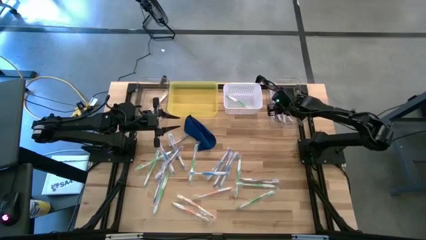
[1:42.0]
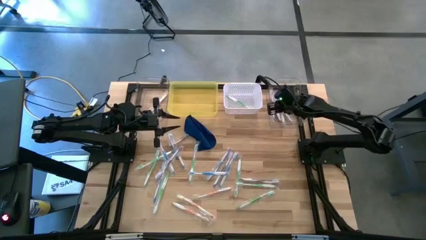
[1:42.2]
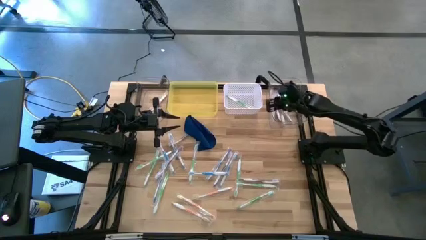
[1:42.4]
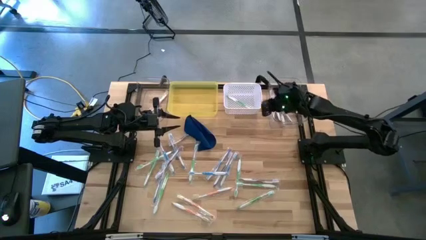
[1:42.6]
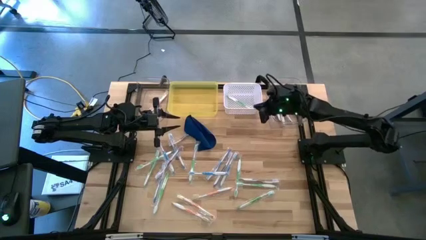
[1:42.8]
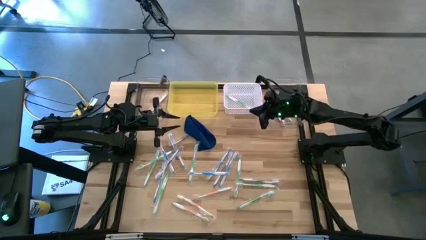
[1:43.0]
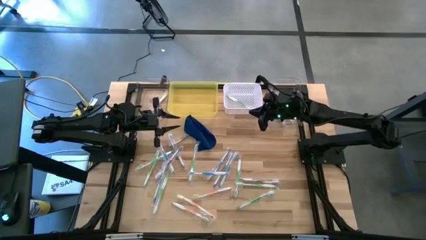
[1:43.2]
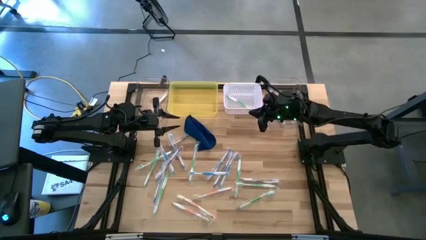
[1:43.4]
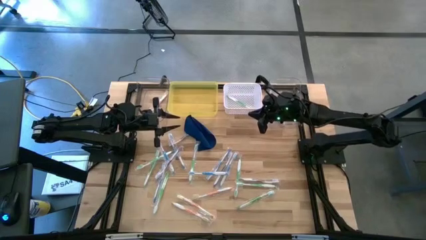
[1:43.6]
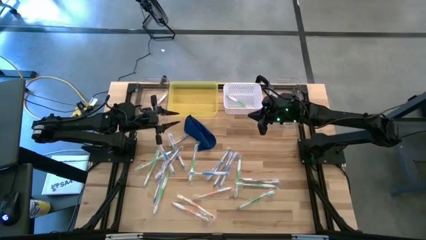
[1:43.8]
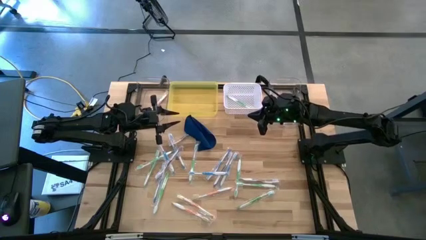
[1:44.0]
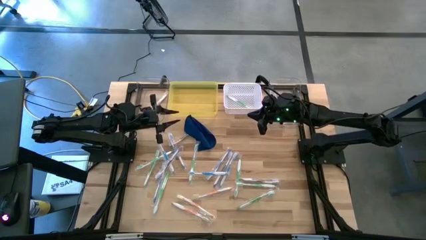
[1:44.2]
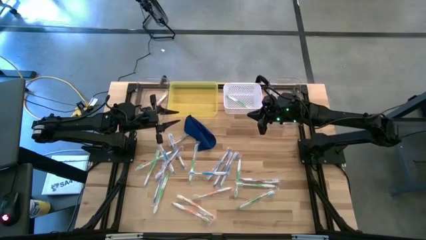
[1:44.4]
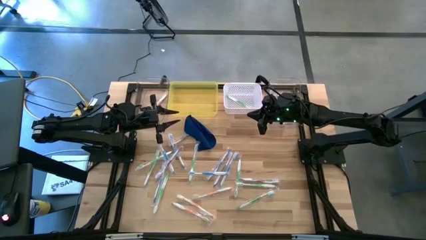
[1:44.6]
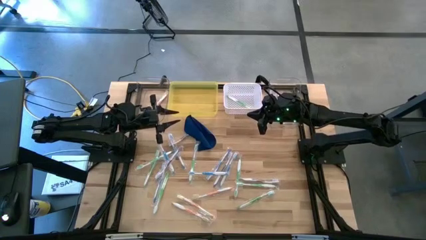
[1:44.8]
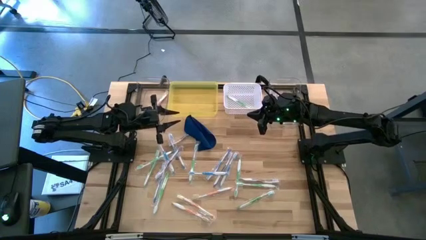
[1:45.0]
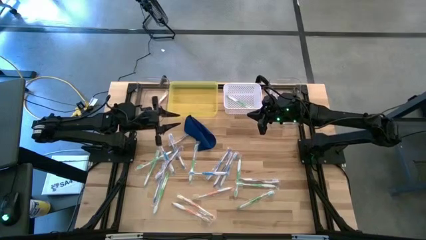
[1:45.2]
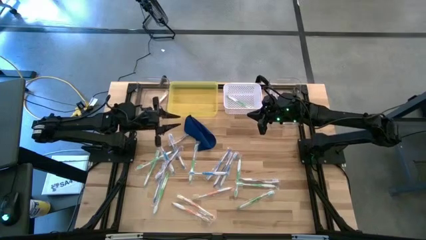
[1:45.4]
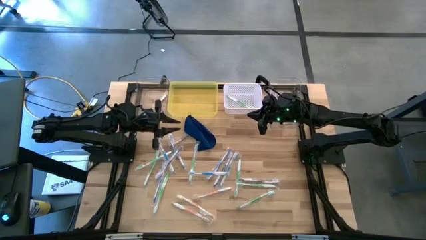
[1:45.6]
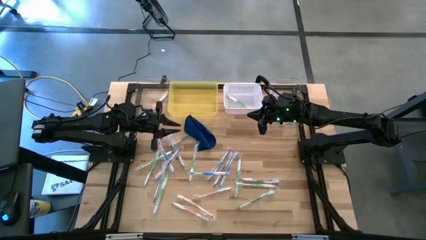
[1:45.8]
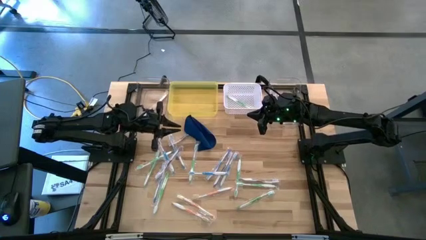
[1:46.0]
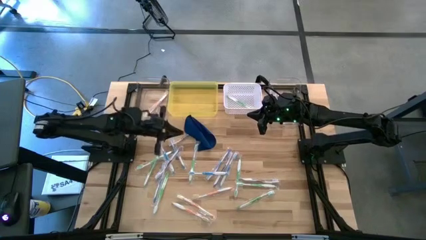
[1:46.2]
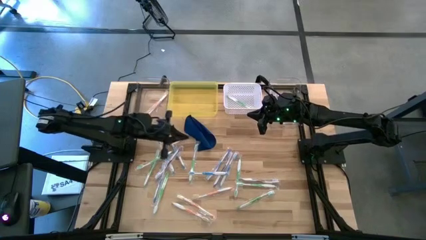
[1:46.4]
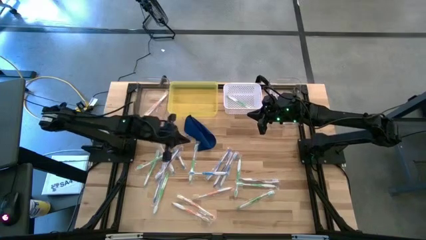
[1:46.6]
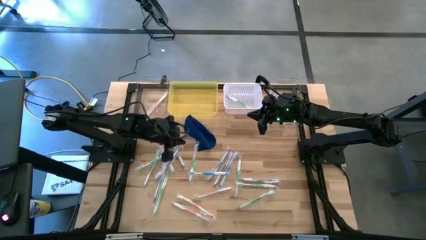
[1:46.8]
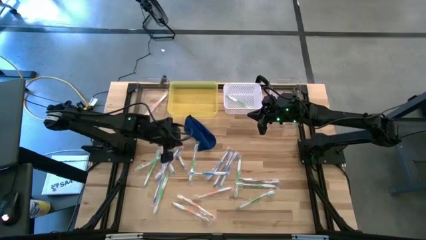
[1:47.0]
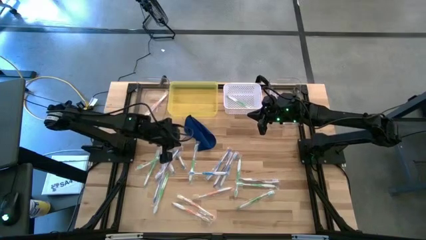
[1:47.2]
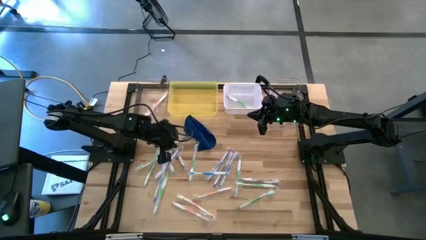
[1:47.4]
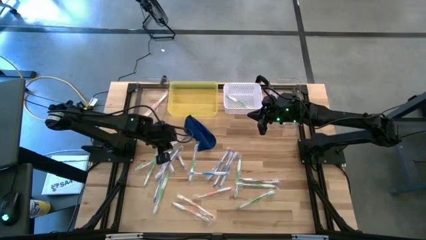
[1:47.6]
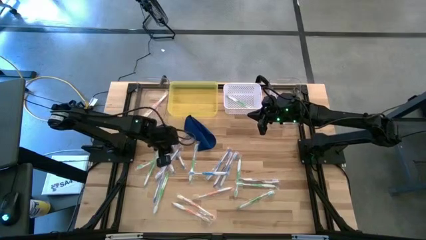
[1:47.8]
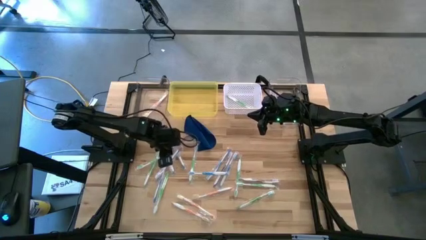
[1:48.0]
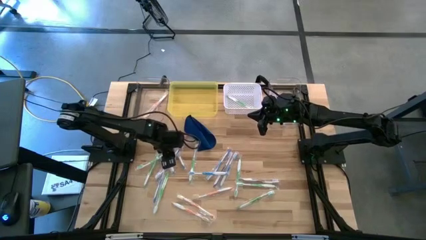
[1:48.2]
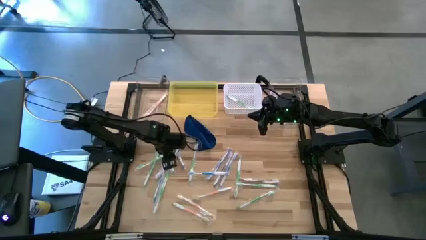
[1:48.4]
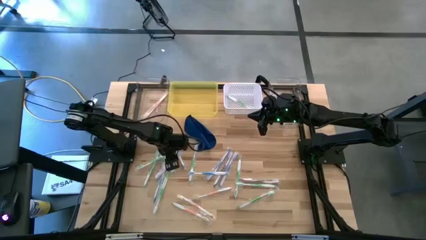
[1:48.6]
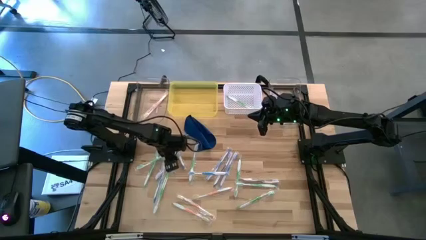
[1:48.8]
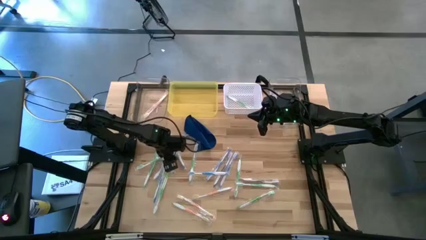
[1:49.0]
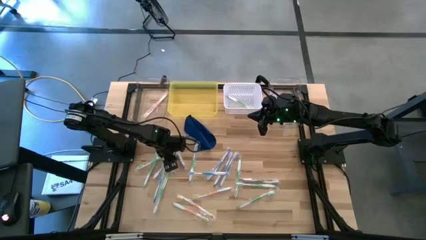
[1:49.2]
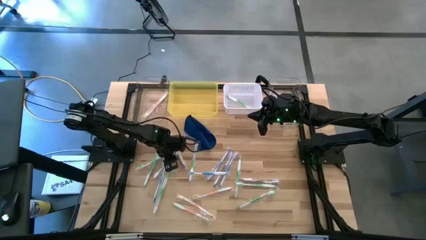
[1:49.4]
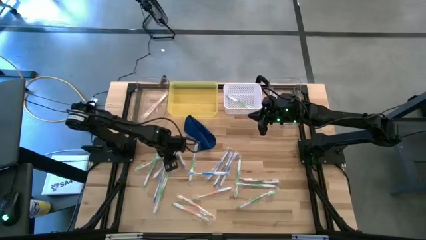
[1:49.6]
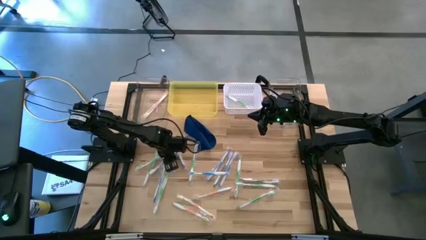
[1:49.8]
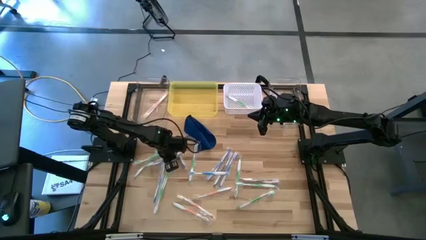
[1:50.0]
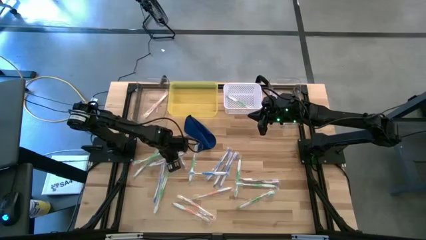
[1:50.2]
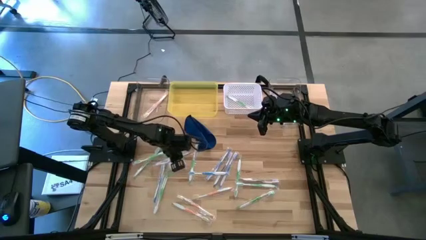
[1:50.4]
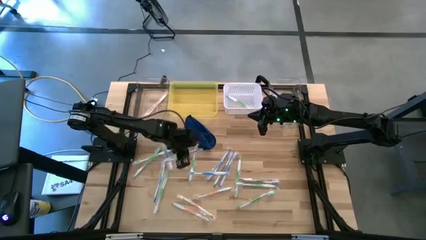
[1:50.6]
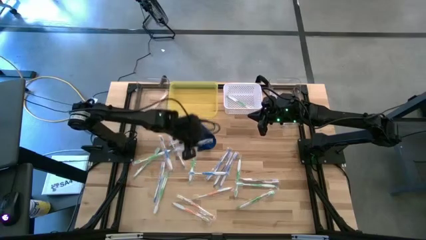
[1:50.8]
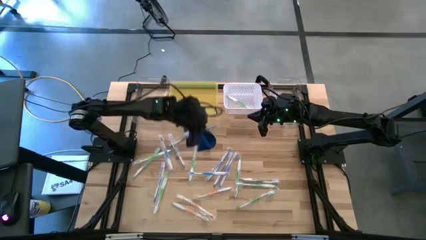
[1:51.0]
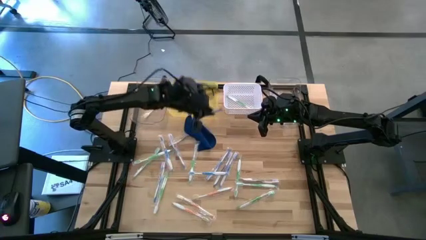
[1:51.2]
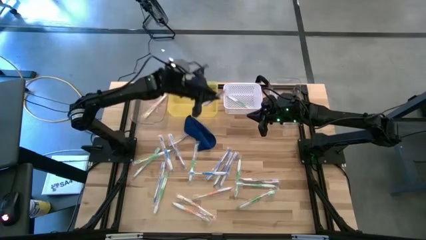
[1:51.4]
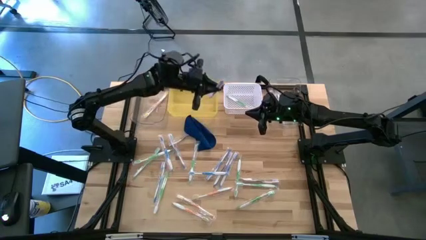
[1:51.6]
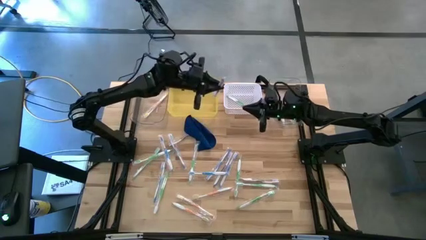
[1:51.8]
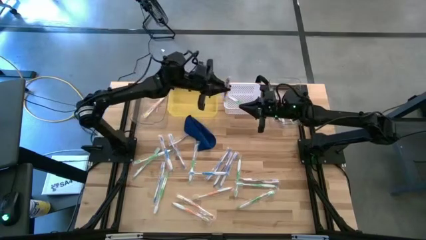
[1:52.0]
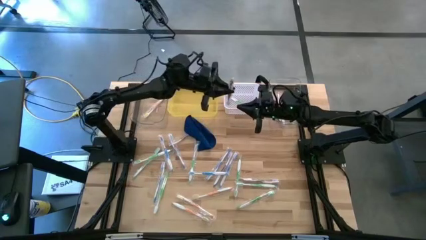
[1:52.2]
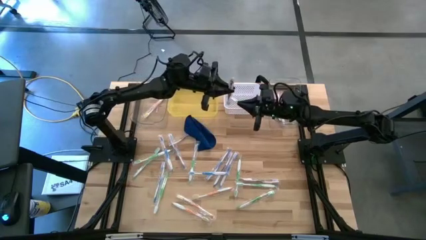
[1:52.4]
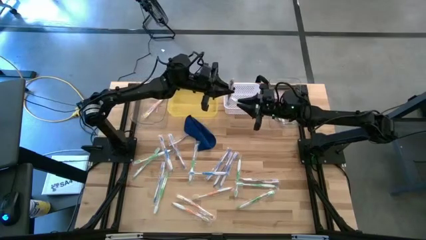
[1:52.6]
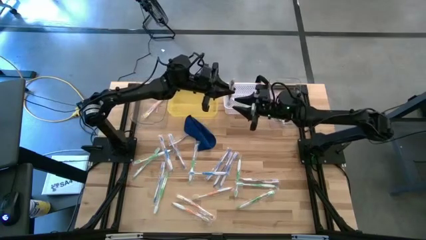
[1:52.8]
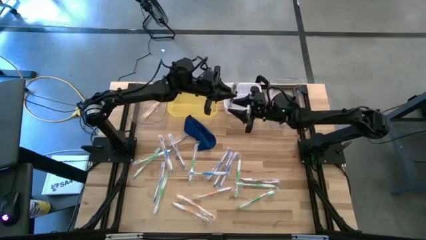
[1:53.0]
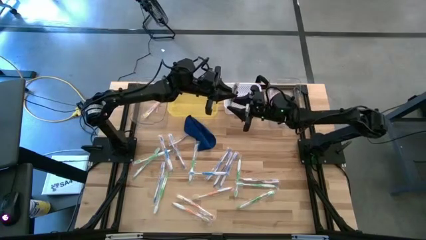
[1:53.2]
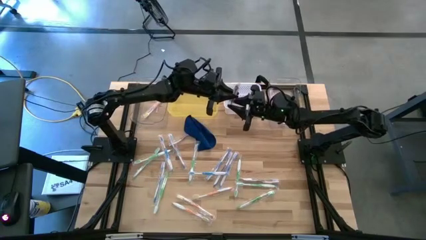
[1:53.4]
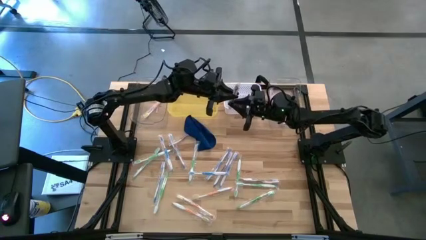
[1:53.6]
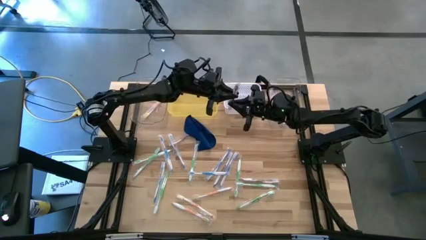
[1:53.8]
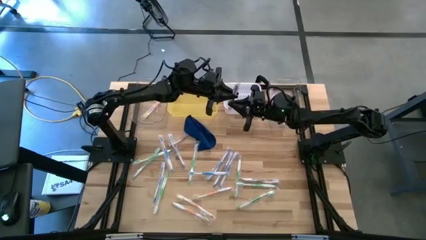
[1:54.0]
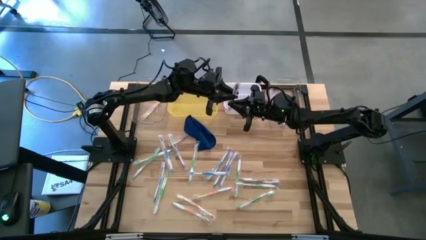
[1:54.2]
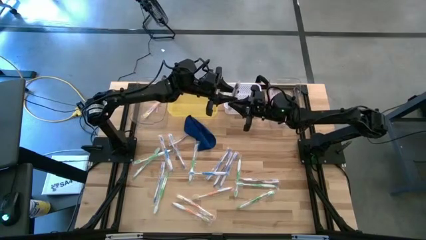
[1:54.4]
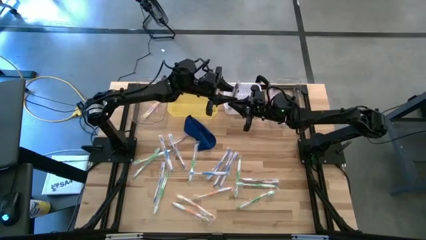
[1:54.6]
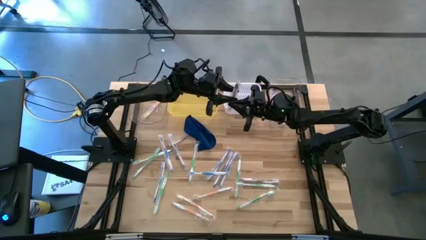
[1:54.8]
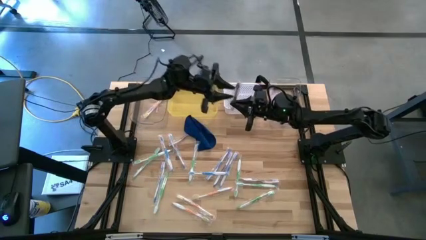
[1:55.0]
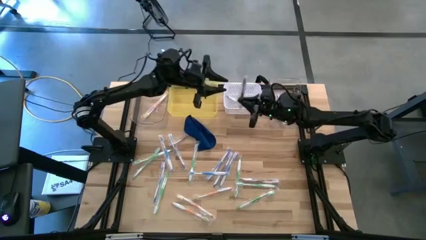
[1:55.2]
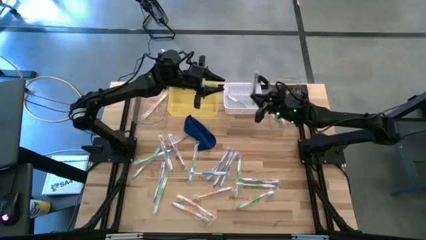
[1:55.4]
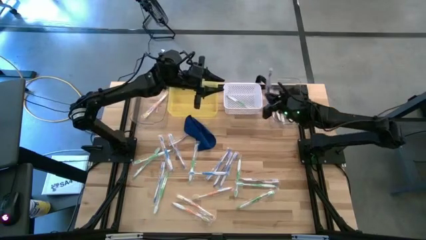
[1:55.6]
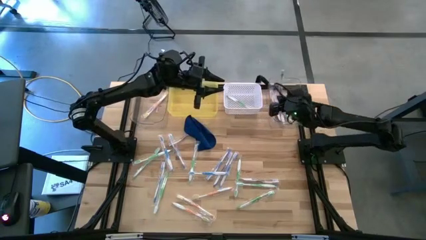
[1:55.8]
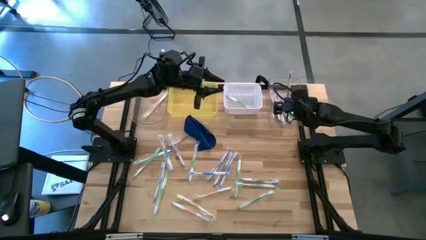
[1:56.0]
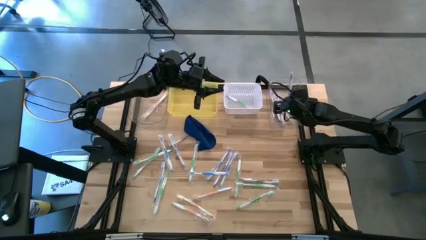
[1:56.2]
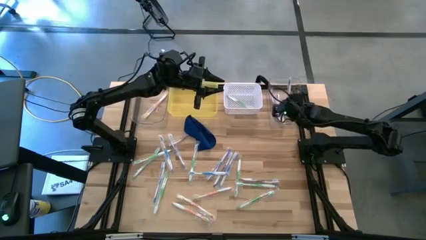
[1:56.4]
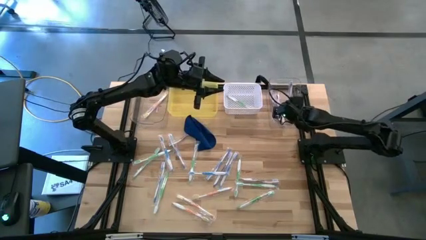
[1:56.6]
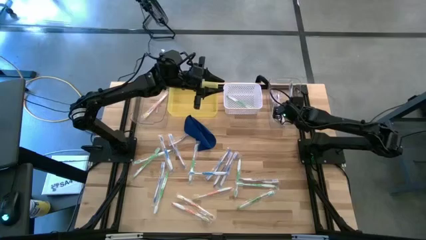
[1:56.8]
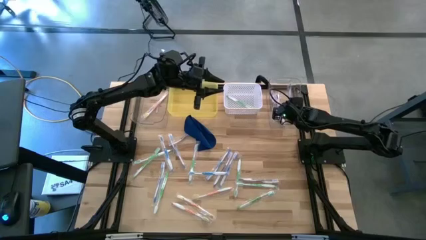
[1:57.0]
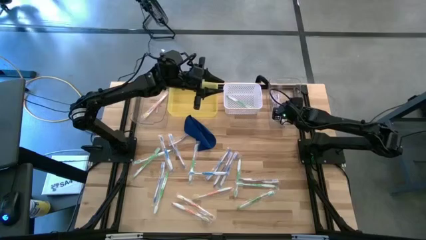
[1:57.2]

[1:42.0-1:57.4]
Task: Pick & Place Toothbrushes
Put the violet toothbrush into the right transparent bin

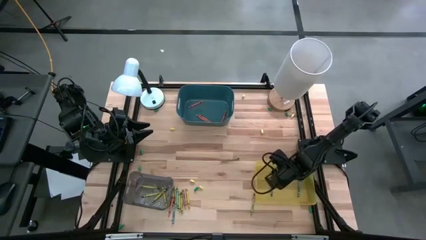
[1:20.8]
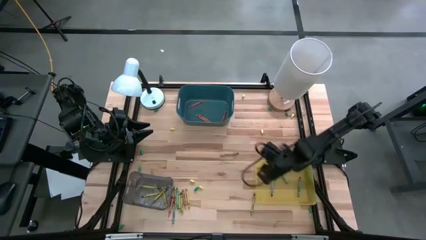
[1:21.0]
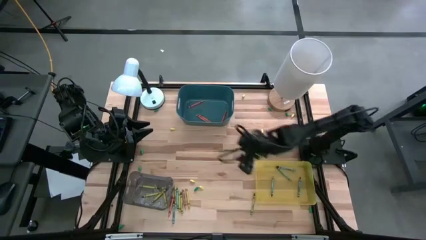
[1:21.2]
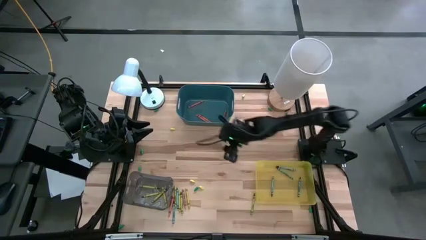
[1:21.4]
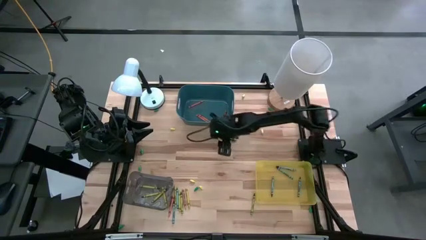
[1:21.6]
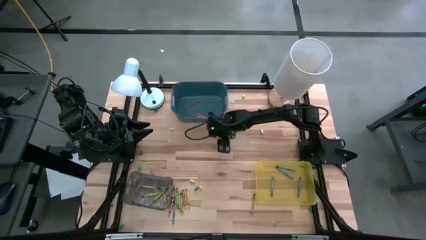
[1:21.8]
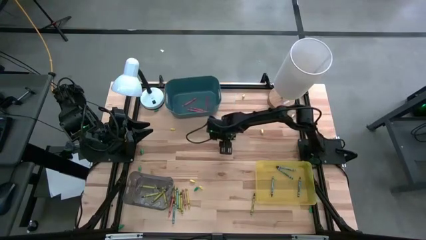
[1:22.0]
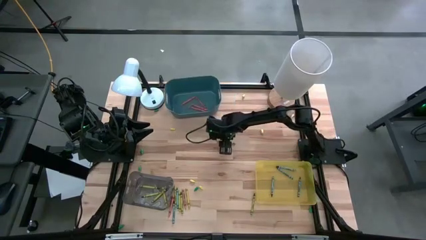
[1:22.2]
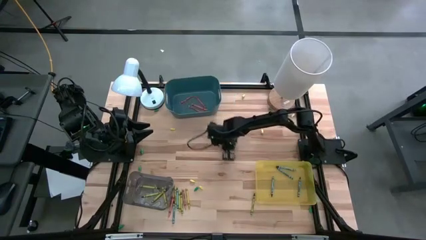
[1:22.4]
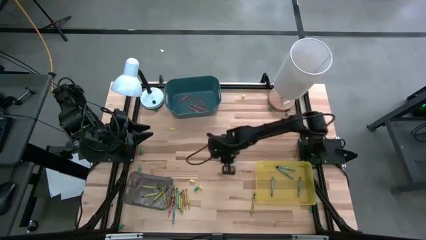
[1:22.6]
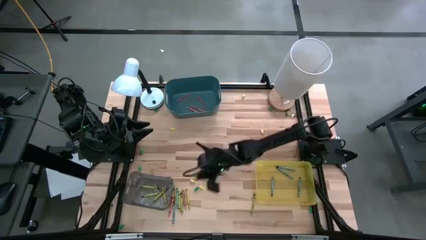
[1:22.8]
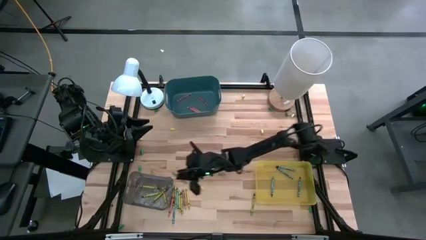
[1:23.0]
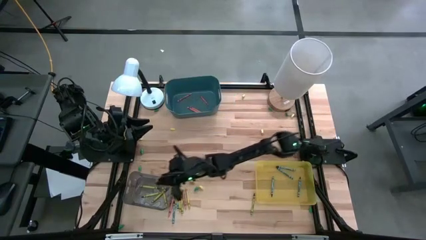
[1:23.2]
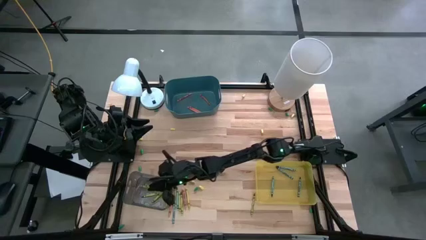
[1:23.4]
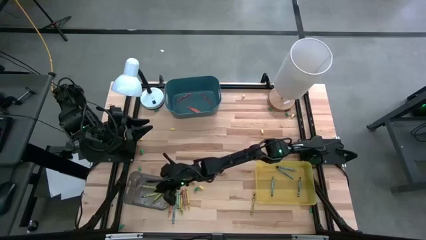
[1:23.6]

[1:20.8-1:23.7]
Task: Sort crayons
Put the yellow crayon into the gray bin
